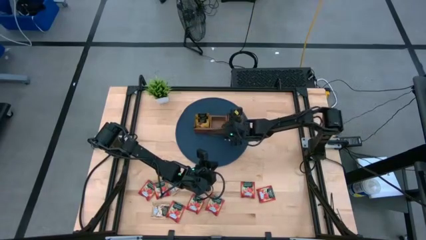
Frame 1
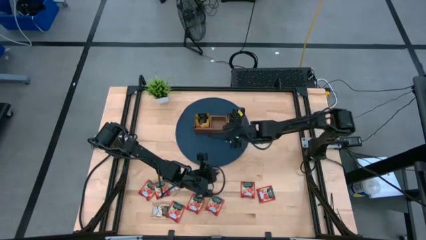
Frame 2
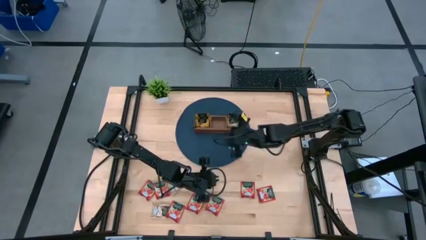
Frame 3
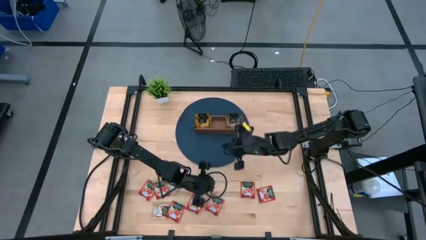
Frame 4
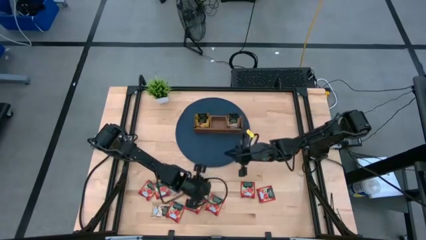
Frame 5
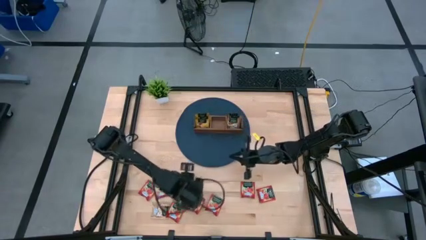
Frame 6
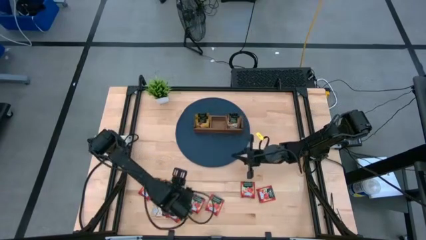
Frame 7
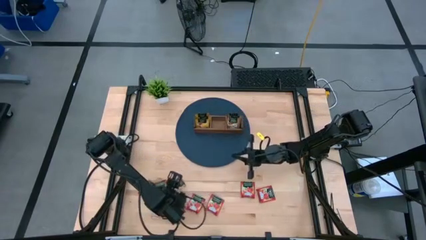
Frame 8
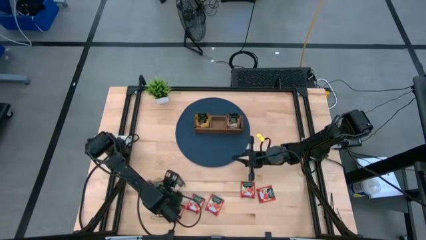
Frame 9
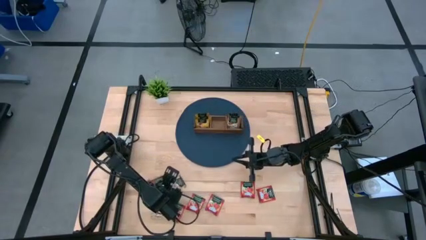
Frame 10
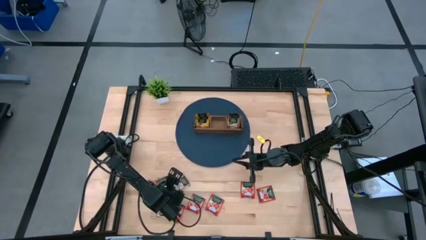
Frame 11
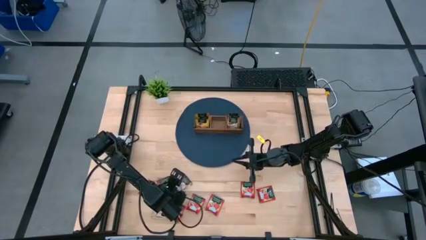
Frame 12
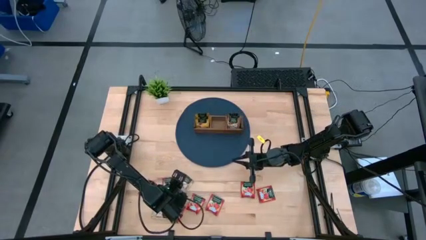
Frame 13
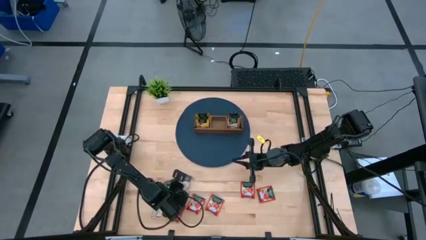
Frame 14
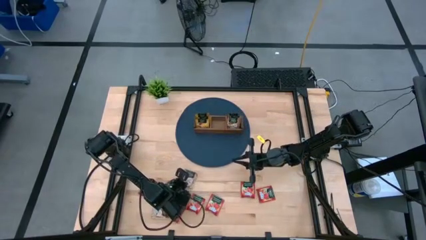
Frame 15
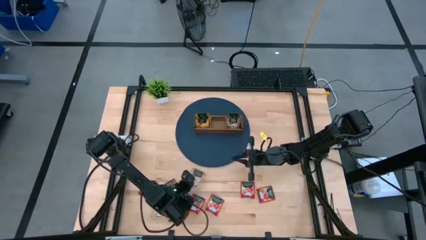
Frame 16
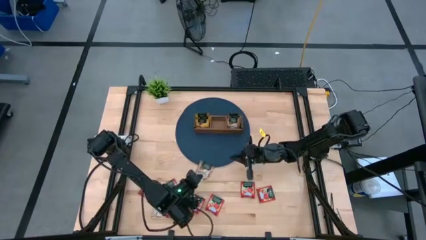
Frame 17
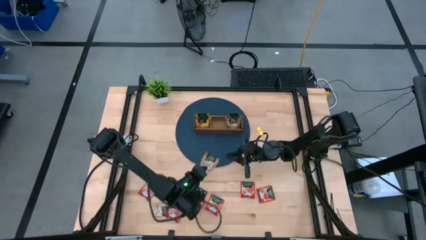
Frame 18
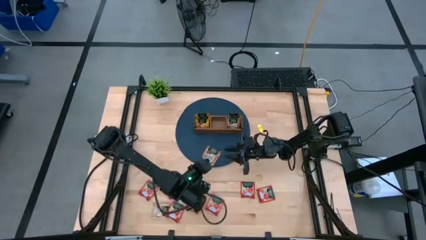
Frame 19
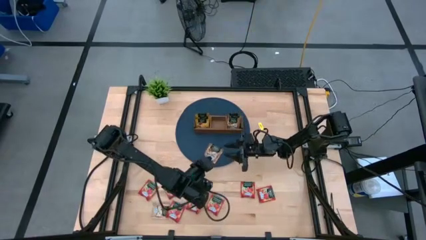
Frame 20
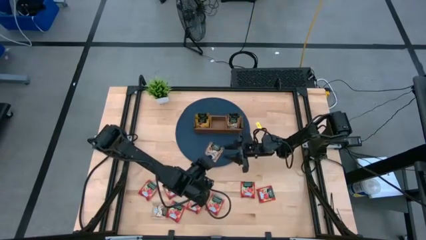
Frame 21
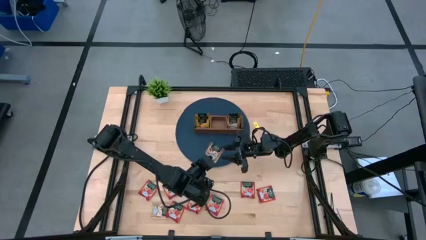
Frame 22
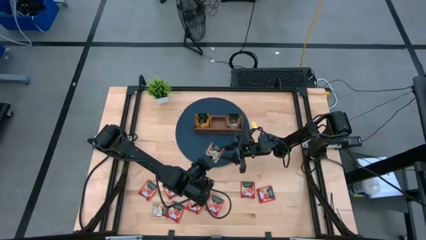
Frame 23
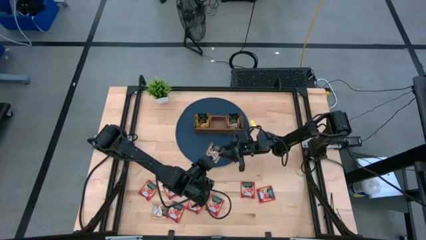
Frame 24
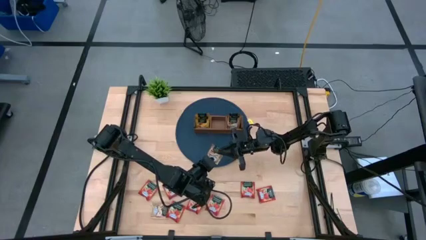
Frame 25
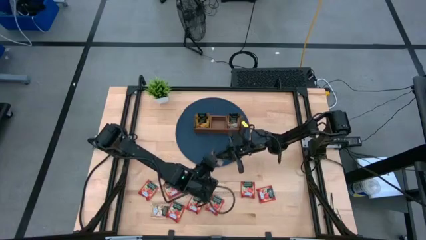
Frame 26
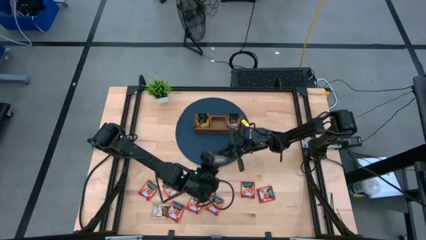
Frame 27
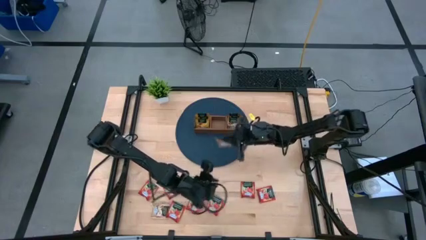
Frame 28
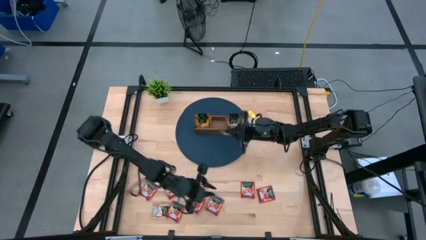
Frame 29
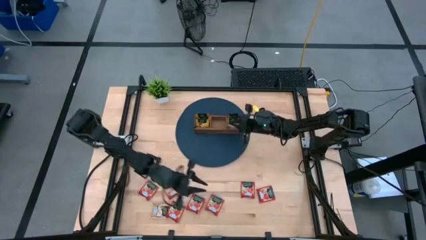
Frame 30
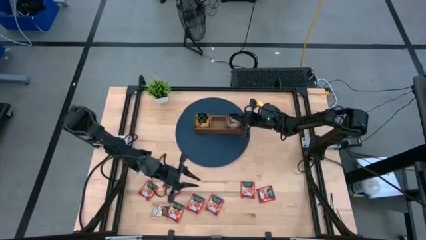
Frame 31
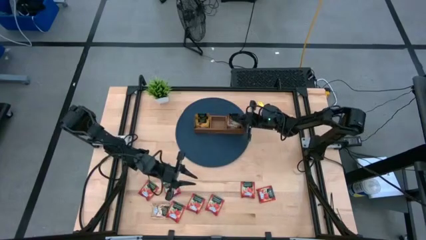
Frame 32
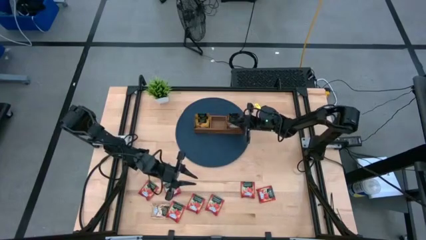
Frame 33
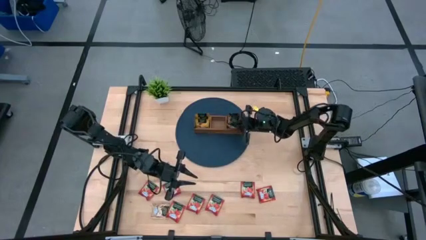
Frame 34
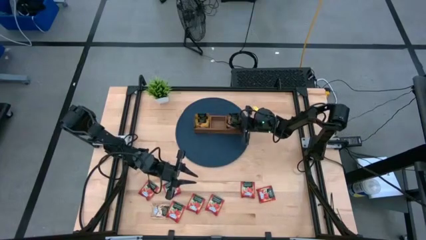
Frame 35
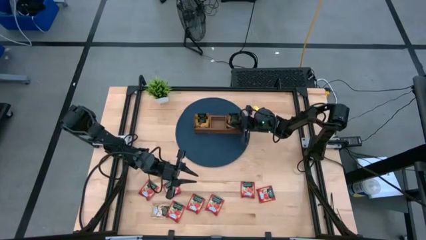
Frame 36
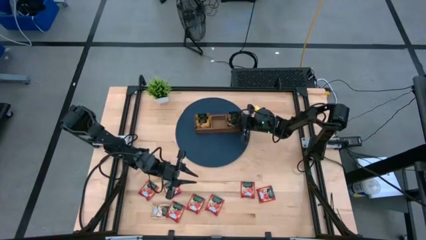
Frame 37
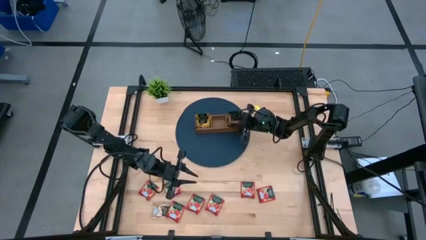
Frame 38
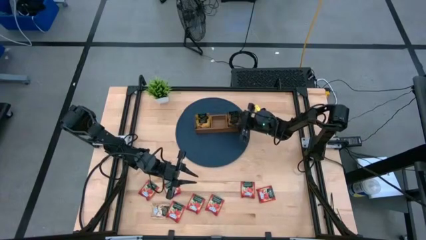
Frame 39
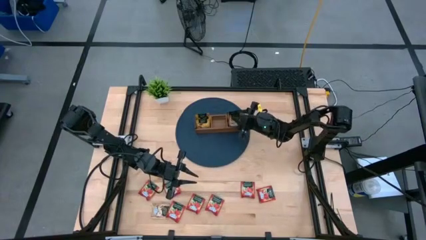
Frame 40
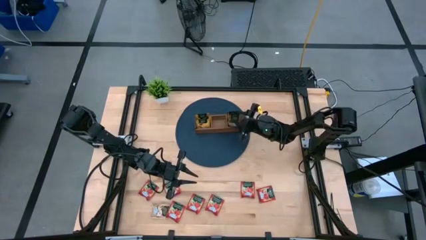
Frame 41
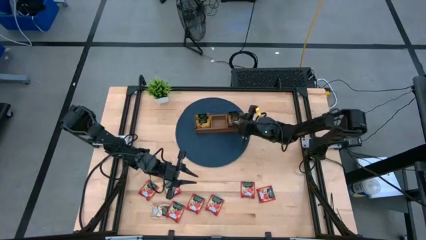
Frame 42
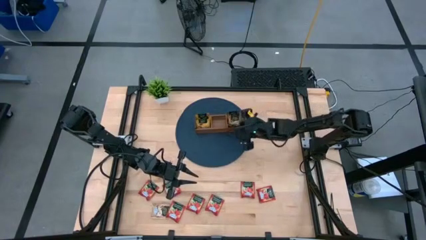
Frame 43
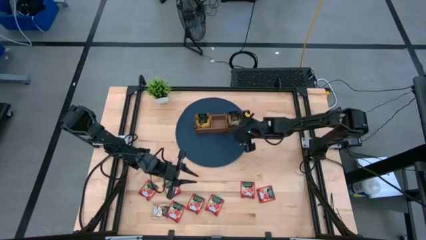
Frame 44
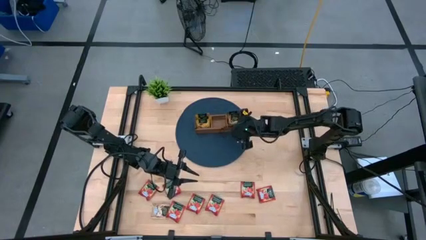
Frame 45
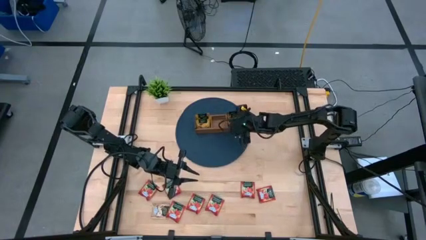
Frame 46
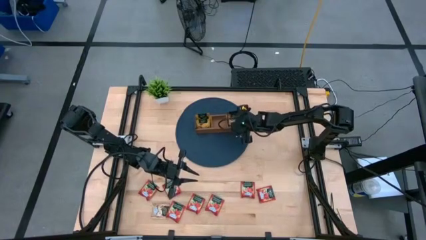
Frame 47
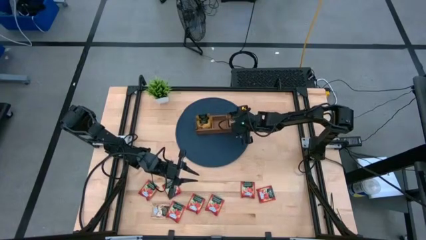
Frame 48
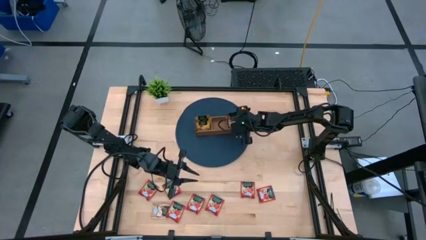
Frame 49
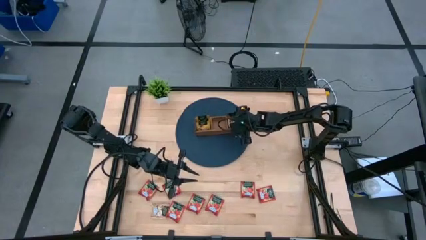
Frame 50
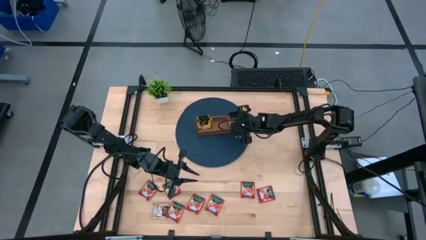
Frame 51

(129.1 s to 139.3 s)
Task: Pick & Place Tea
Put the brown tea bag into the right section of the wooden organizer
